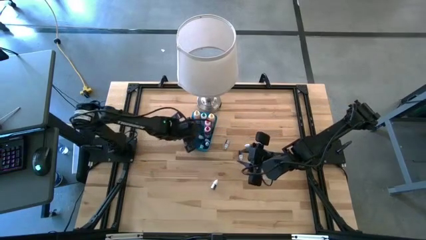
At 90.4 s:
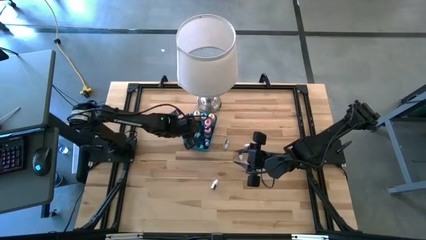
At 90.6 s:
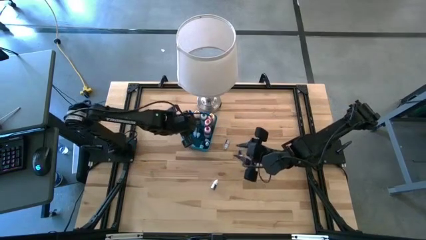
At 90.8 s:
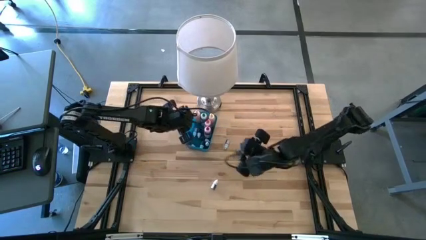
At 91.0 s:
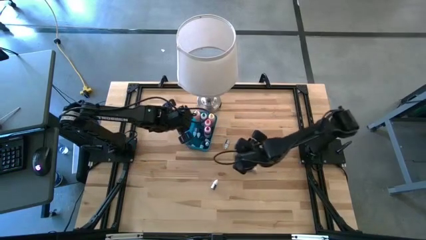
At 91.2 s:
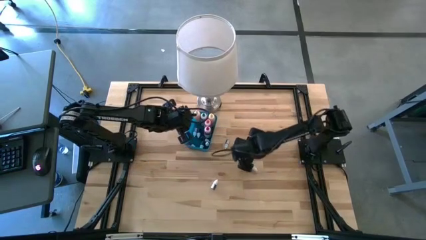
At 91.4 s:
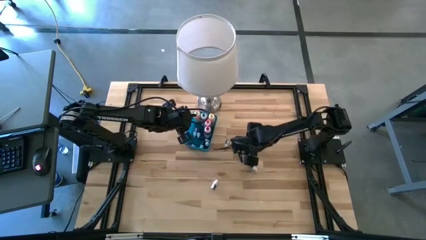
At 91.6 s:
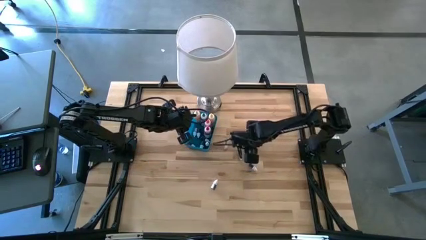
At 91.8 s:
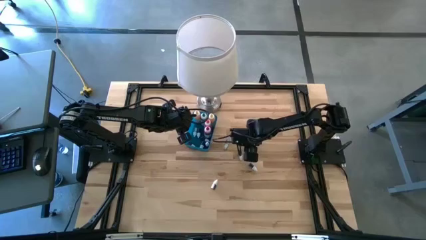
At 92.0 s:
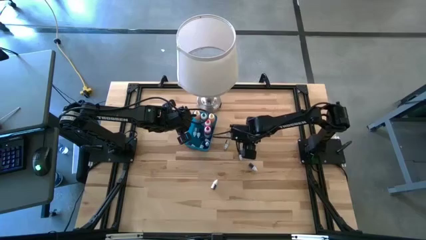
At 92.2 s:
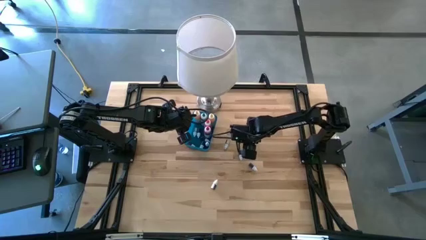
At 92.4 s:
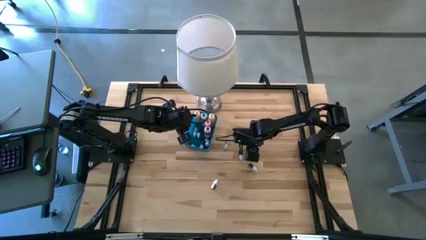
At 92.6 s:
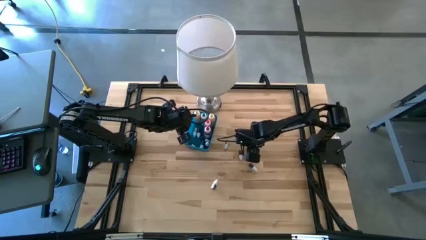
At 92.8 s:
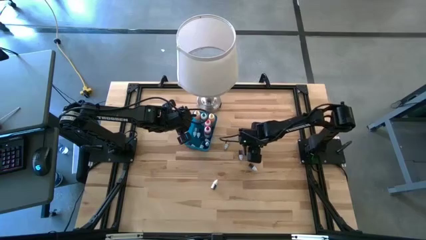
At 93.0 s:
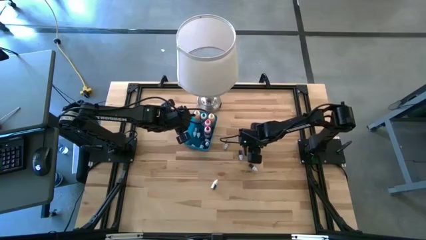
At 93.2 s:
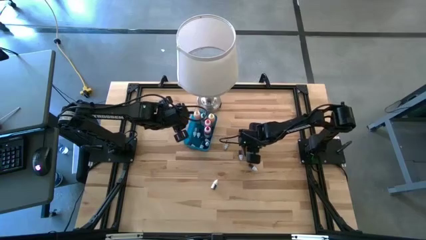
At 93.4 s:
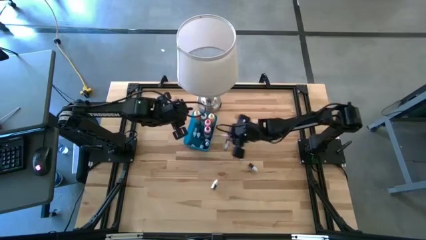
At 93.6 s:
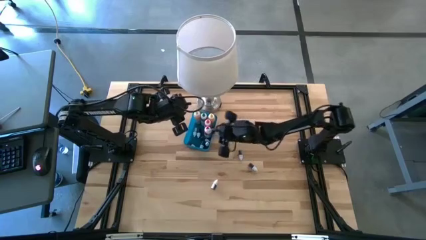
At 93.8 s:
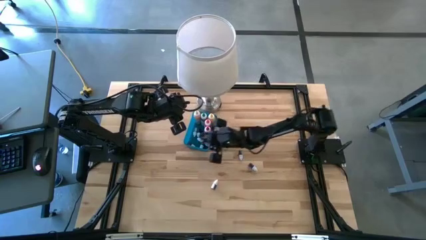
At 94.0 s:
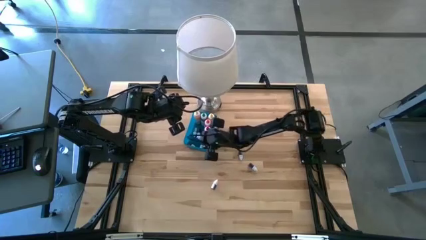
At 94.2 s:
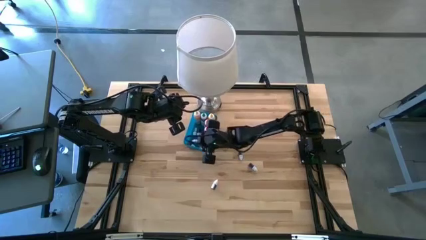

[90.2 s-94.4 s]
Task: Pick & Place food coloring
Put the small black food coloring bottle into the blue bin

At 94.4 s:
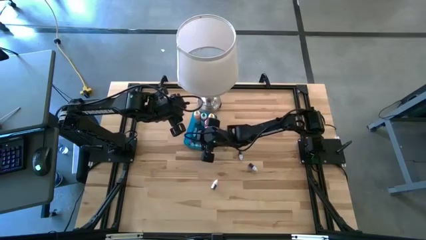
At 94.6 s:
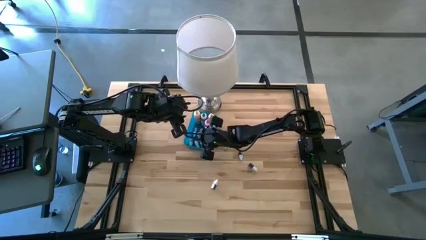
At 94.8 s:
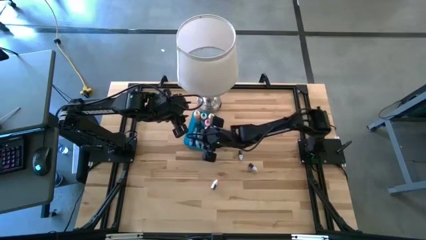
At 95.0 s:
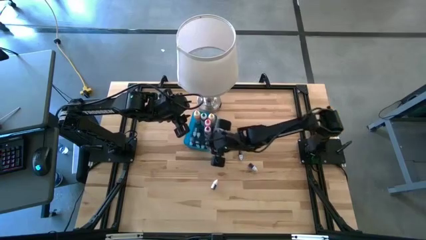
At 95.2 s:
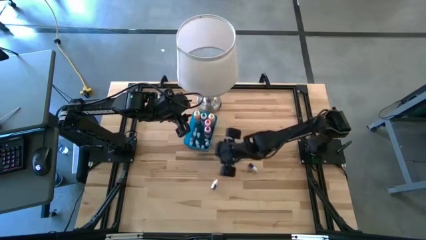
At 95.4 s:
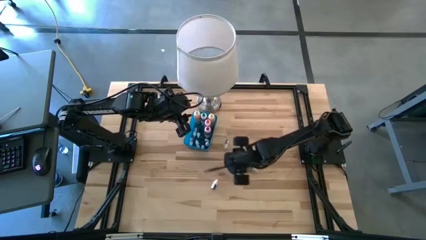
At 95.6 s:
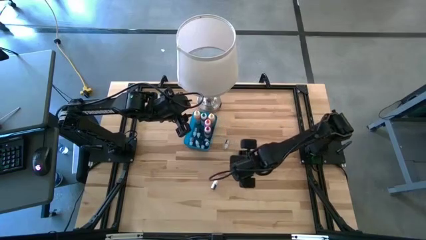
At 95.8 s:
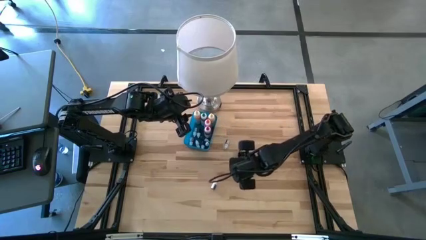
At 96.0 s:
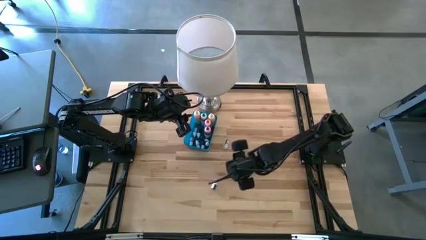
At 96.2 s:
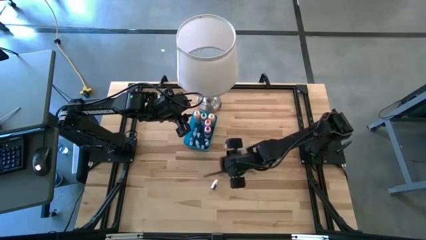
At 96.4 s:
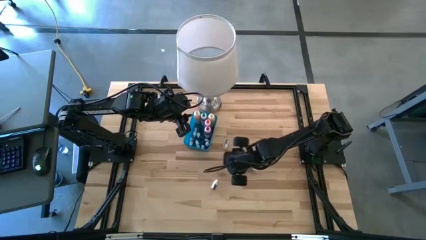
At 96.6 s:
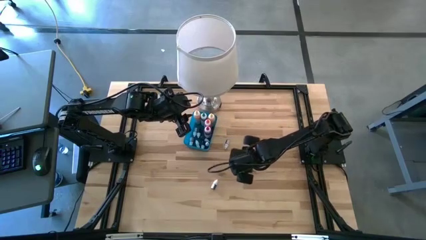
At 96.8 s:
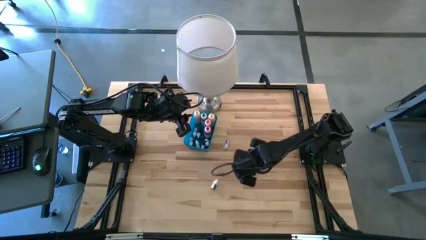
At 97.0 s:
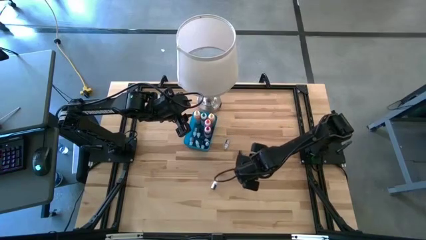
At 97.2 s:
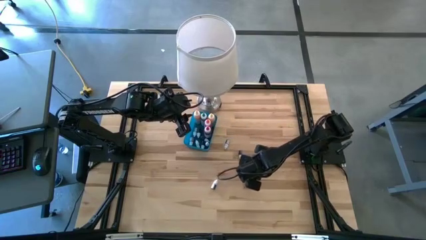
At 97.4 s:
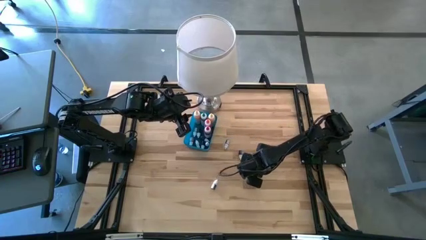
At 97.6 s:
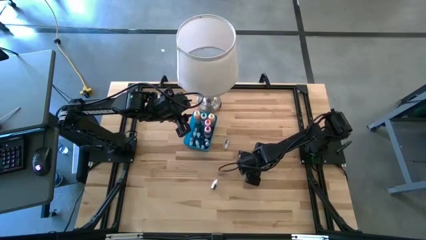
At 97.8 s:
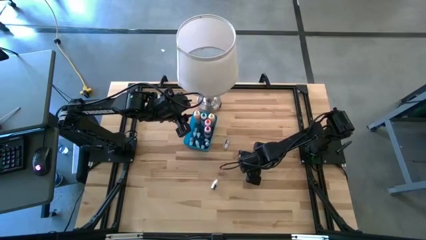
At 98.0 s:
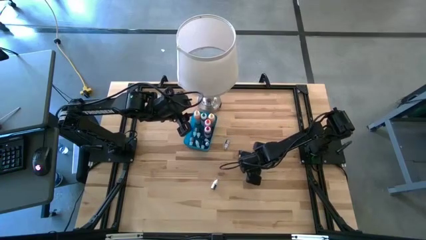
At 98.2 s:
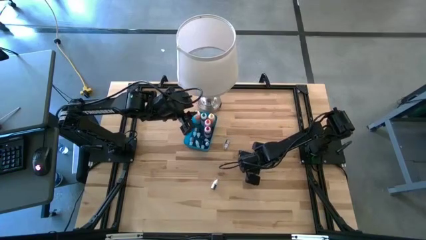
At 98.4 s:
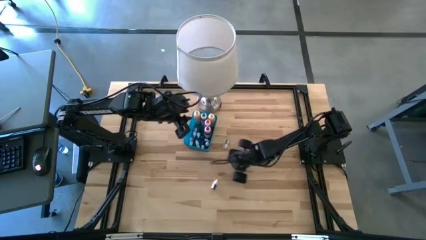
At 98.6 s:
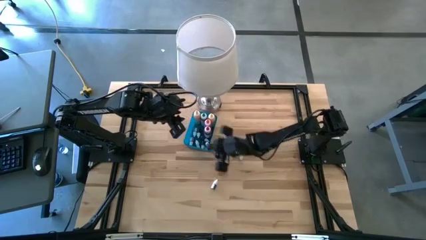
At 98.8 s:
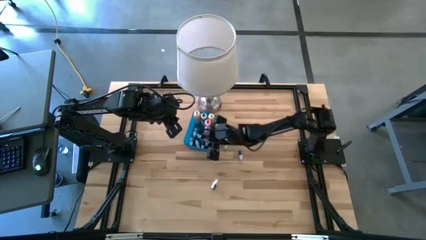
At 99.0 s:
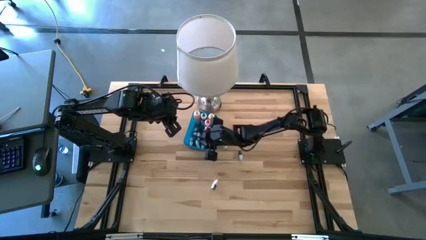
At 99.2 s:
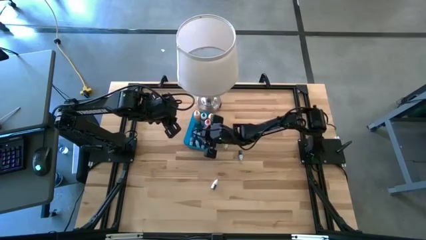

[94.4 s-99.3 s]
Put the small violet food coloring bottle into the blue bin

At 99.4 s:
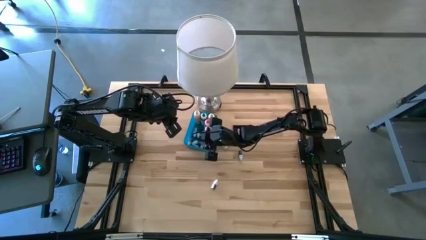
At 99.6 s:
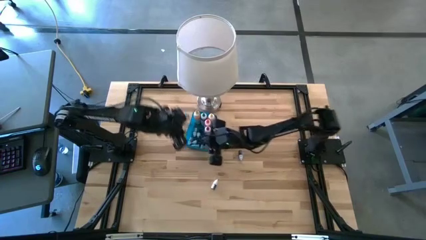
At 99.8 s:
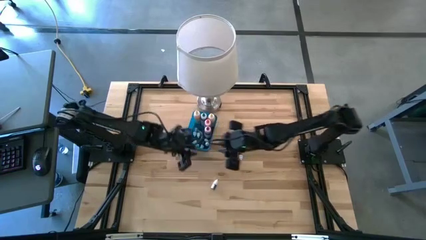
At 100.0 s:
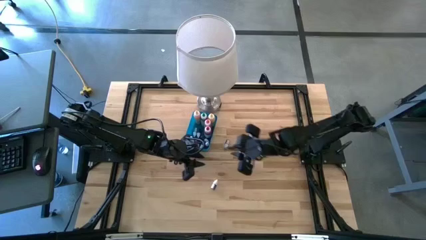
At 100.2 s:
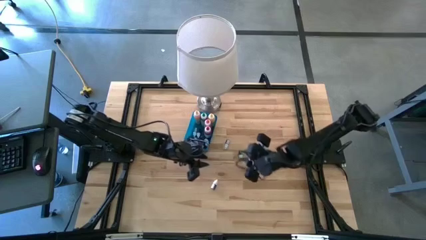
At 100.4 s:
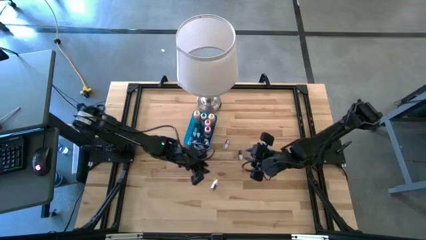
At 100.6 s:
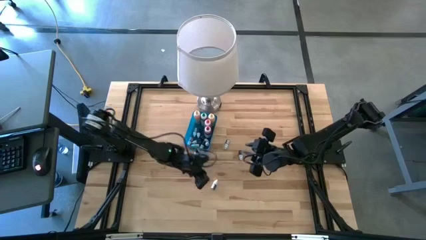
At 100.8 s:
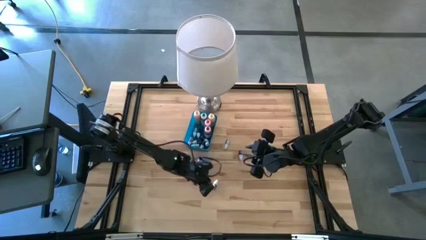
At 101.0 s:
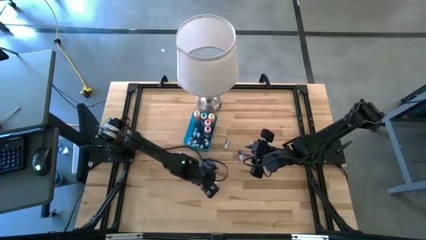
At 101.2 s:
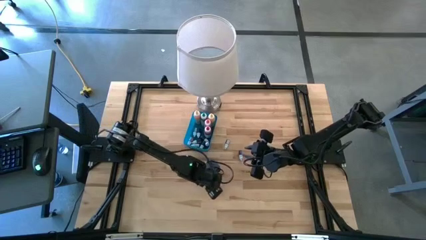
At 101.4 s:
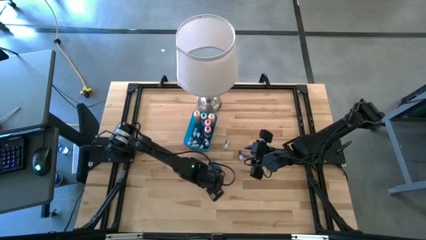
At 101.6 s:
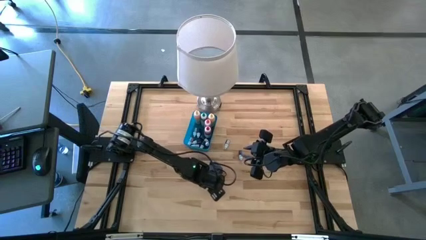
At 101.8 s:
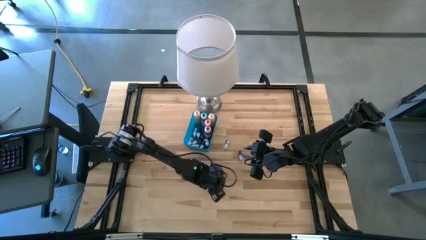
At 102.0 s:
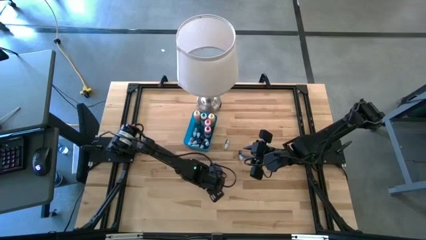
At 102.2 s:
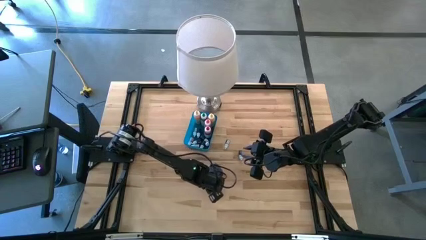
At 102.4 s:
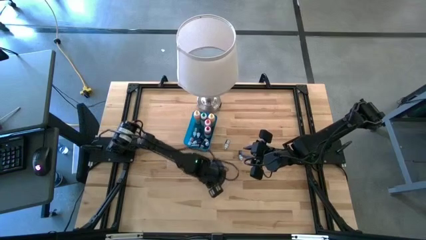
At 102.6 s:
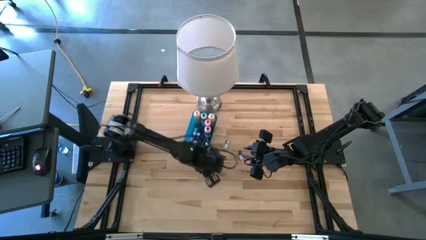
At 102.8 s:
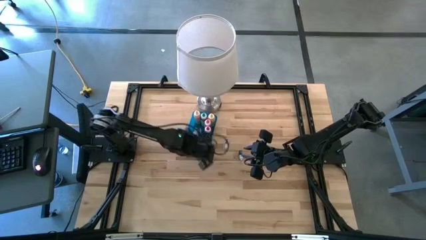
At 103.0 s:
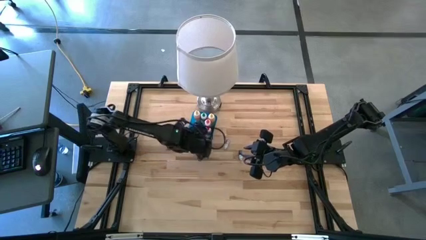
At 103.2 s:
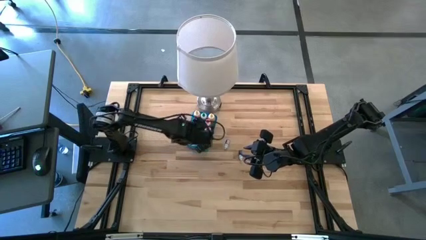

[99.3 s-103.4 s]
Put the small green food coloring bottle into the blue bin

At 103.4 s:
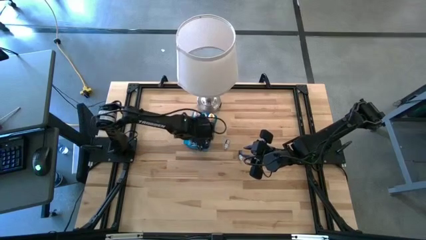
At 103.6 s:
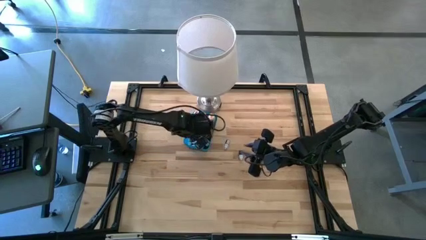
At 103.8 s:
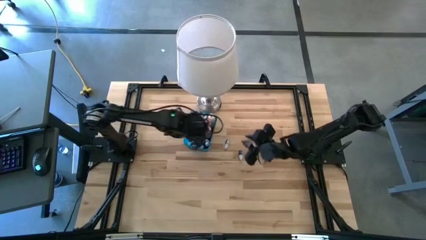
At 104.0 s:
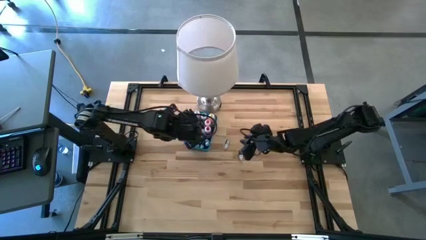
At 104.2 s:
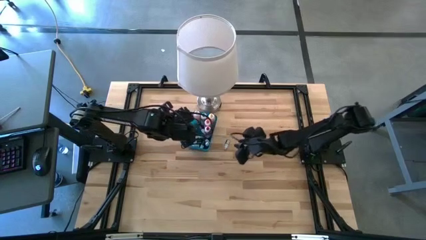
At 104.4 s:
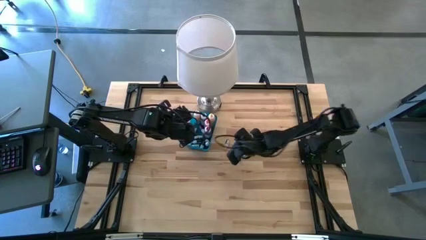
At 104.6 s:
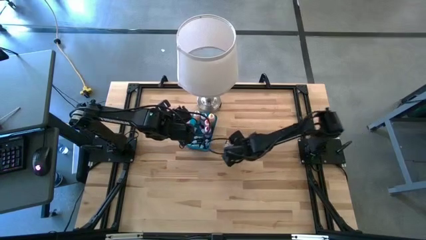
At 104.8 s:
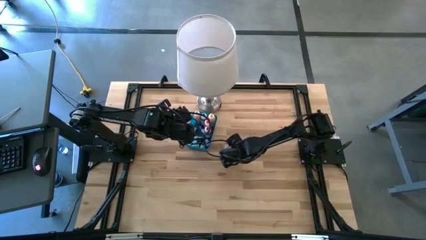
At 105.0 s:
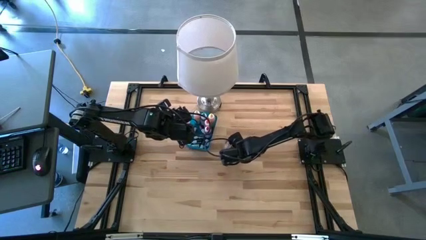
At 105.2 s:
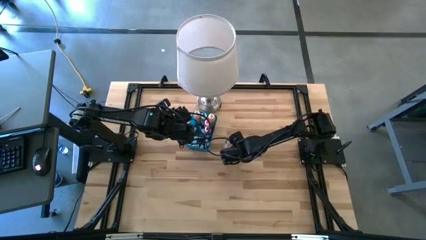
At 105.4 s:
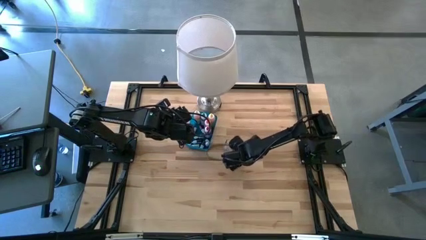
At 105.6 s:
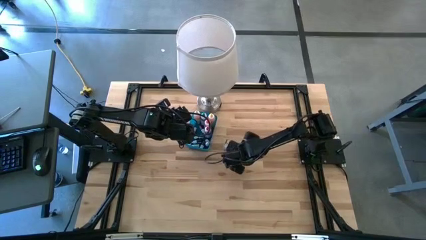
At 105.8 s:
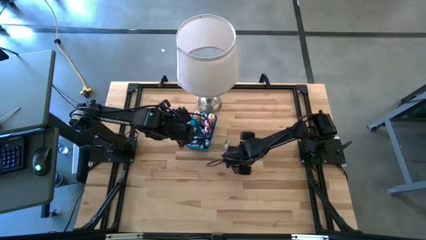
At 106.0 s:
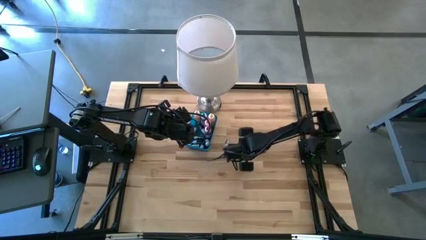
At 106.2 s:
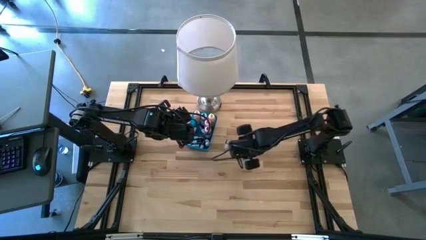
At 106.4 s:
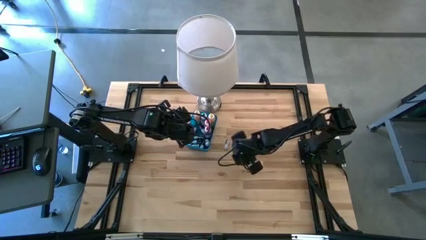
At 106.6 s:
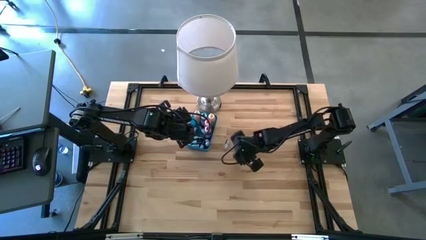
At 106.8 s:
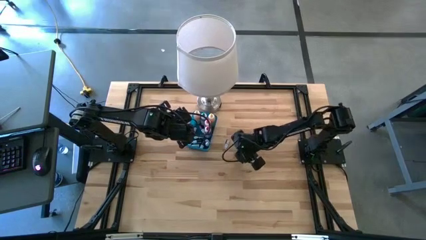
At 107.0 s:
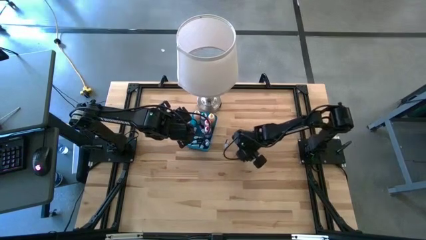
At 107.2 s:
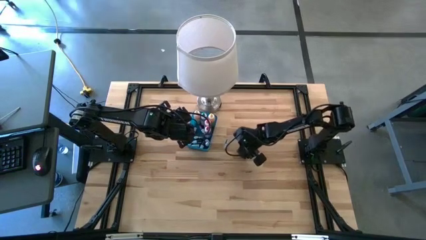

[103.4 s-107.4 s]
Put the small red food coloring bottle into the blue bin
